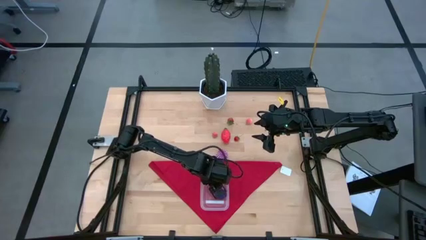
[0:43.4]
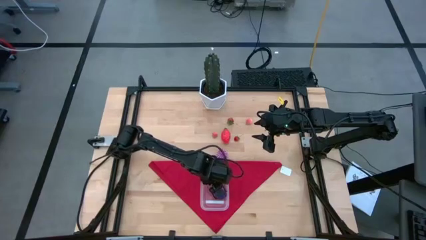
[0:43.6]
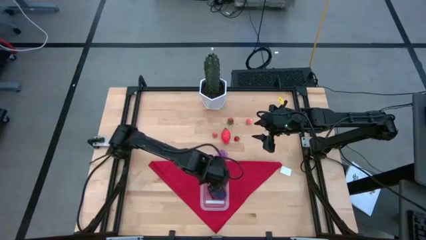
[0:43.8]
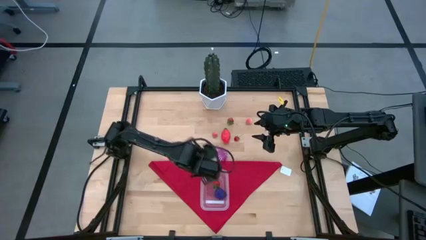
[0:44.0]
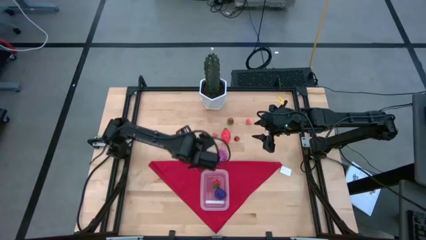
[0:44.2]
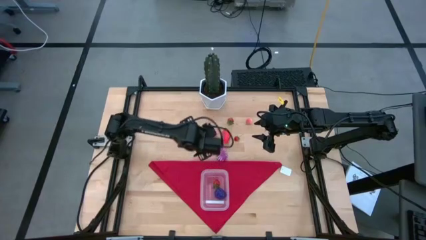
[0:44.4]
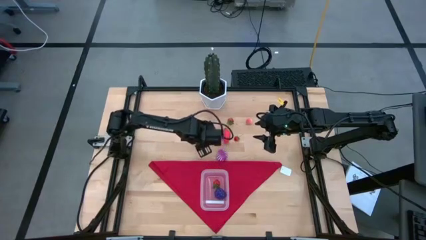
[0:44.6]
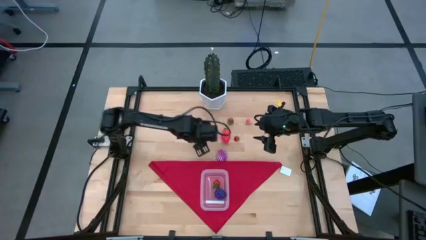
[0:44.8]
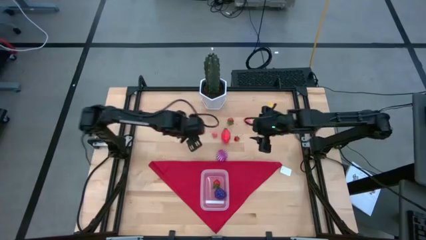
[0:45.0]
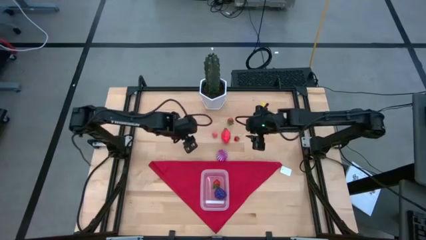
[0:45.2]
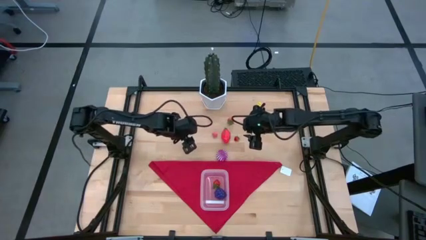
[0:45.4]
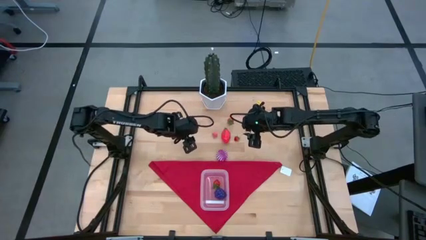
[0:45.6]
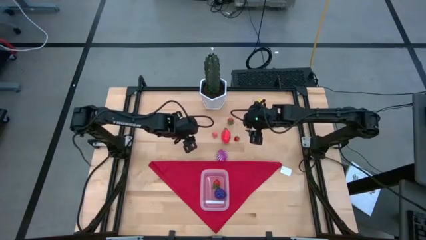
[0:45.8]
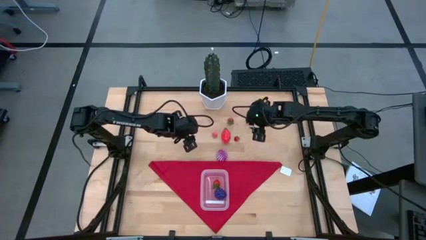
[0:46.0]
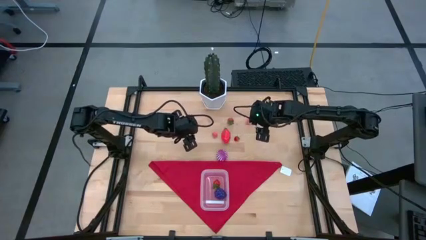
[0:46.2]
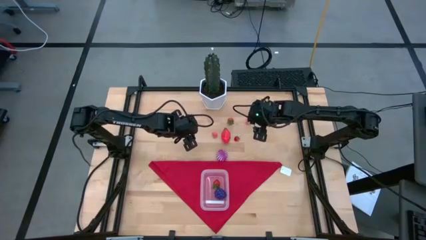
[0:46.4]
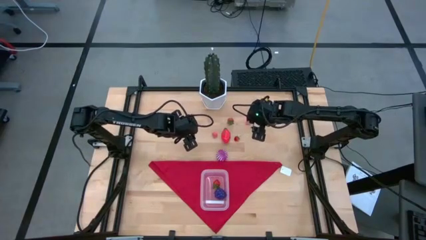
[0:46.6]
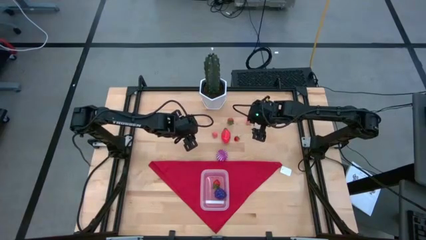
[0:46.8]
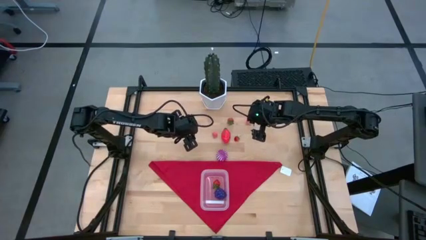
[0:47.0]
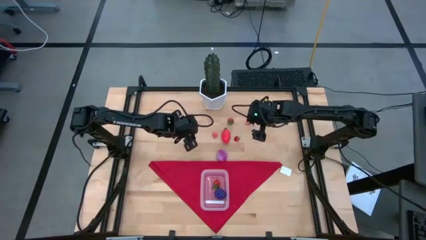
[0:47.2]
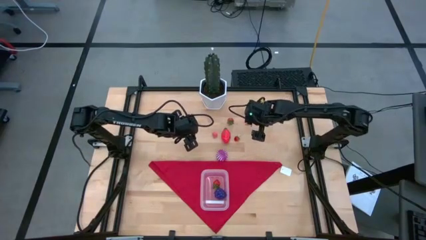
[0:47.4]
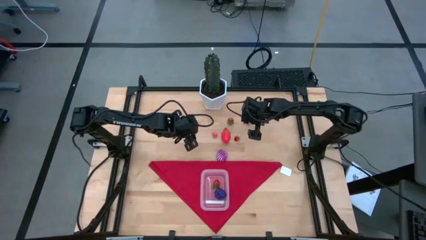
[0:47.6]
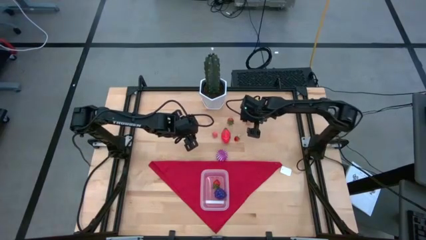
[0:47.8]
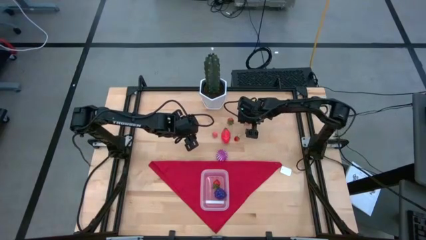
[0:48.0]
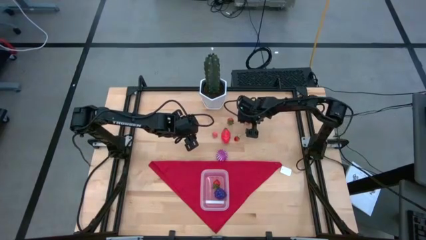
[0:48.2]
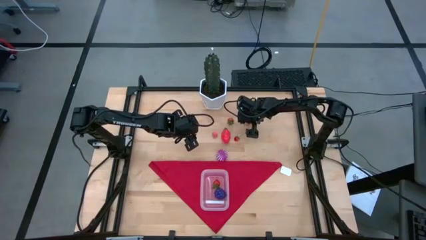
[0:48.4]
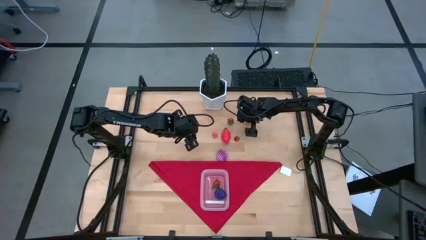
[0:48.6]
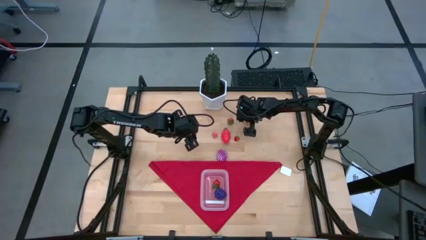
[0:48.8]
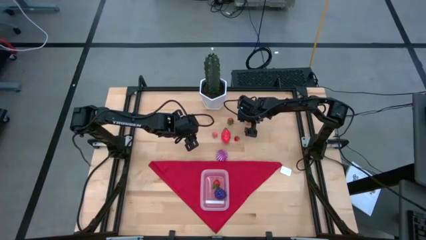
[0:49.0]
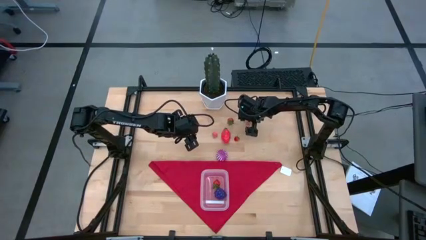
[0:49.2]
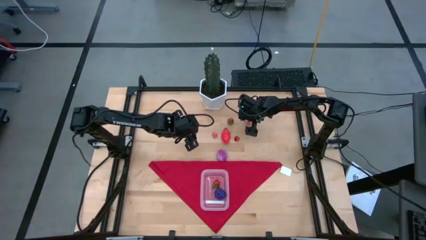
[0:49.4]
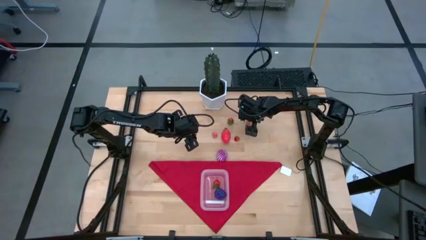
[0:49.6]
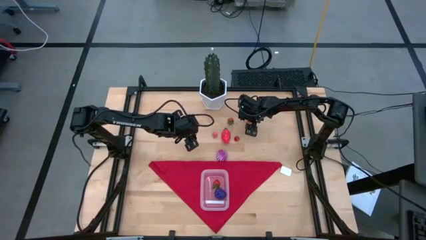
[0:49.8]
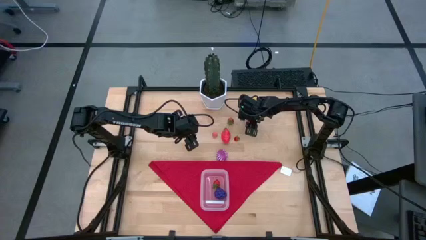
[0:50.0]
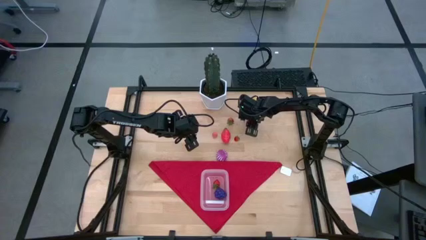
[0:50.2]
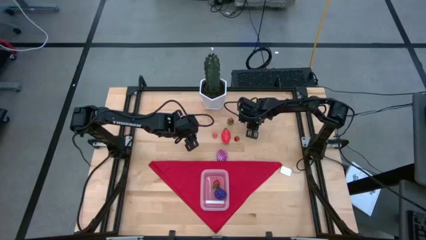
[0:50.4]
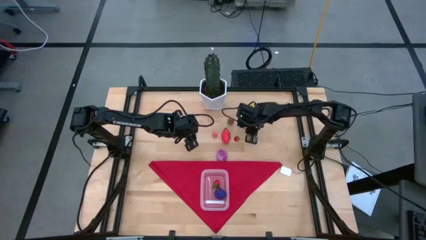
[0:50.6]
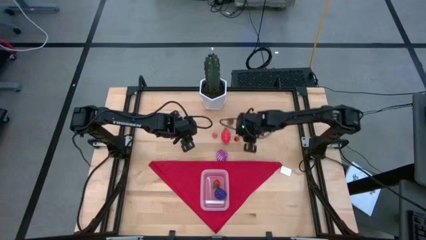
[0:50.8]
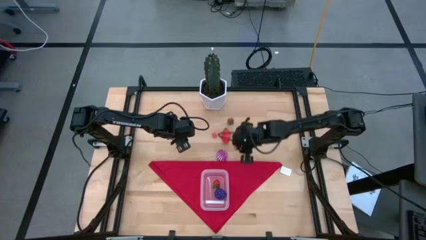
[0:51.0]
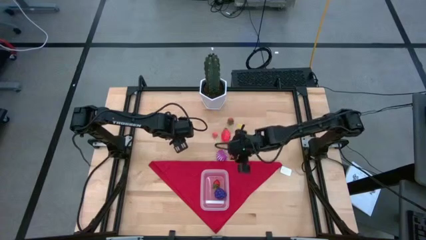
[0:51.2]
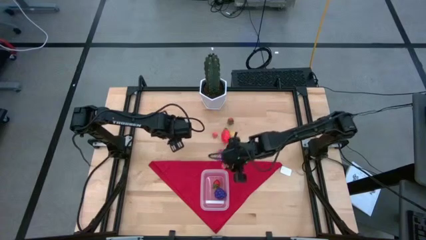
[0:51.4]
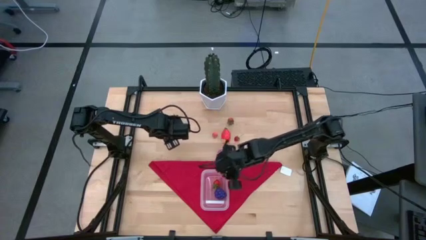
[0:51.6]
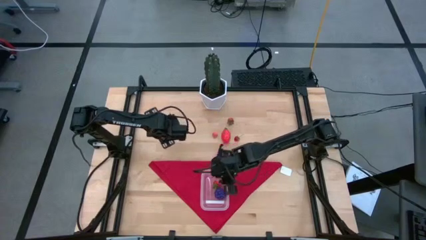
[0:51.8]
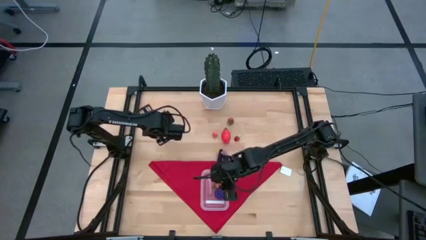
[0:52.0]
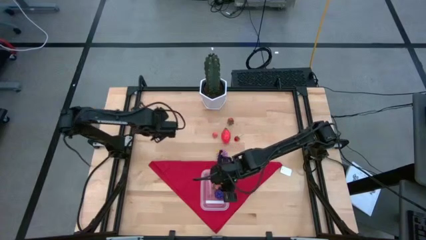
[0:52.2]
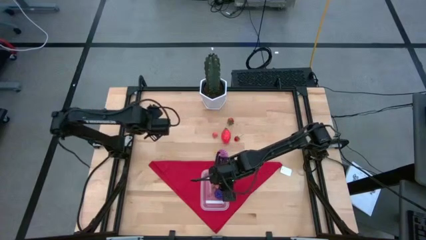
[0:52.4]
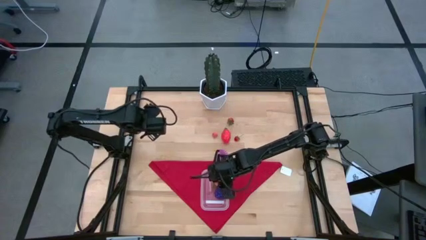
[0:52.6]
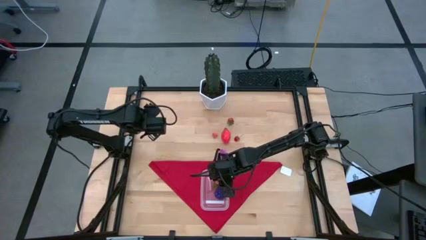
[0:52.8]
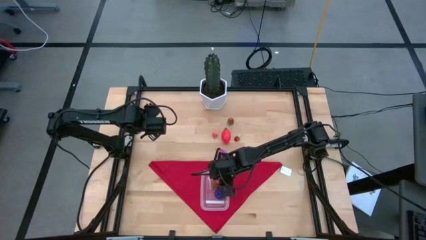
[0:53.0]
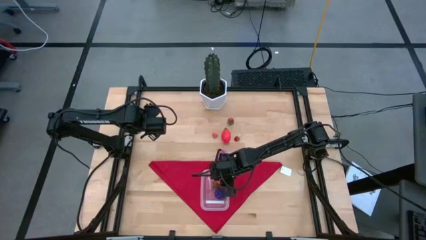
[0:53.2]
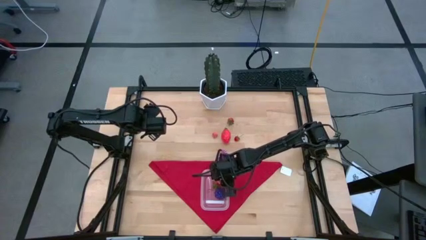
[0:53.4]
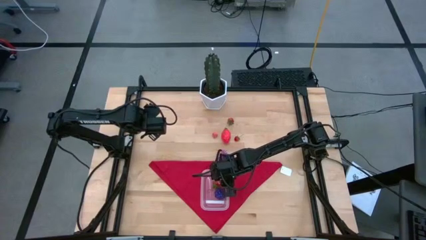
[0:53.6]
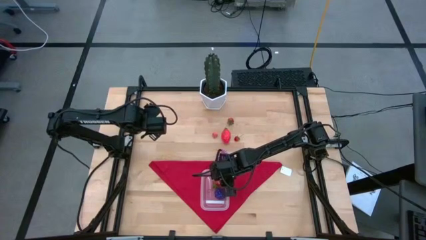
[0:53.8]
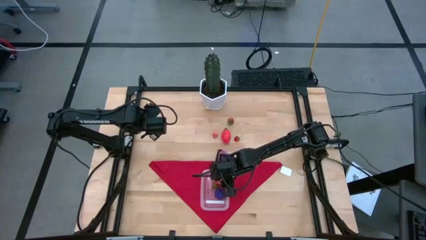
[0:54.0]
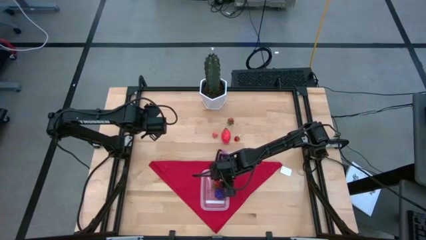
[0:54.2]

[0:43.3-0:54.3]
Task: Pick and placing Produce into tupperware
Put the top apricot into the transparent bin
